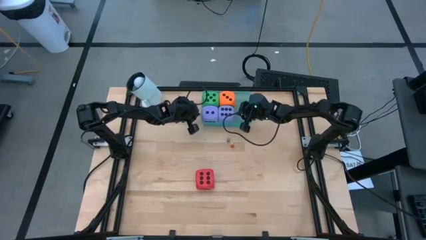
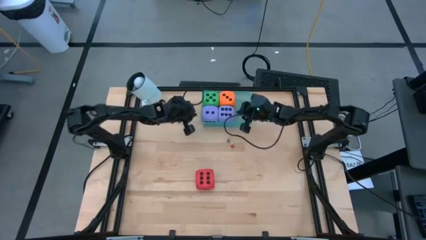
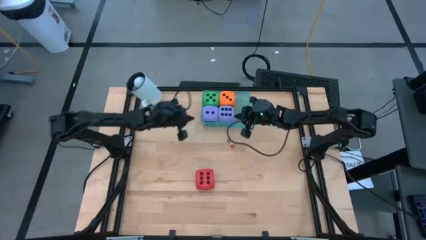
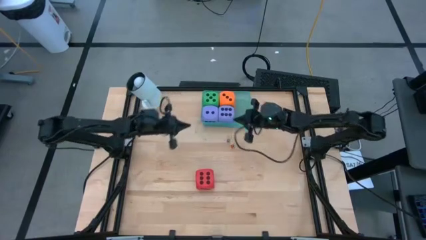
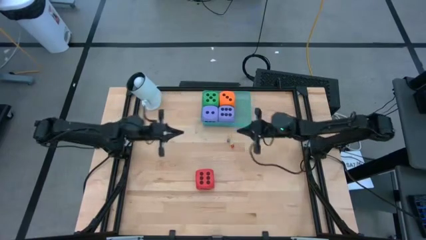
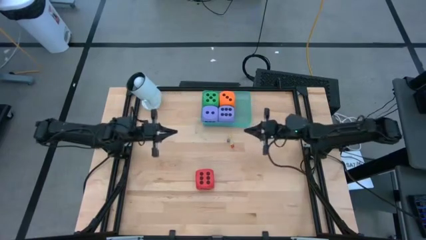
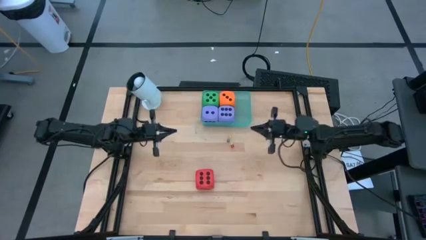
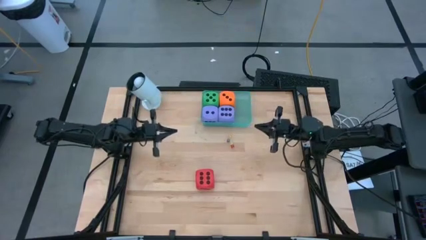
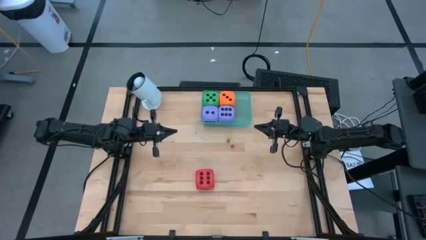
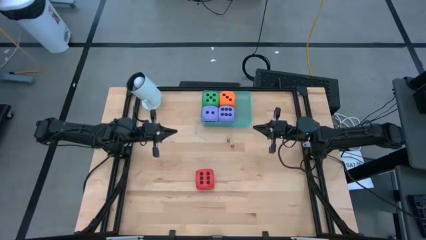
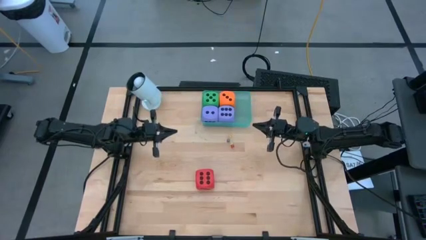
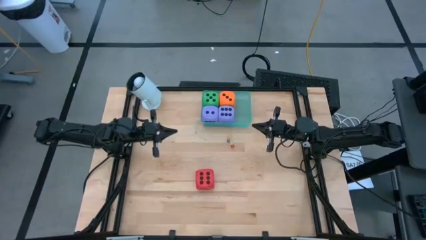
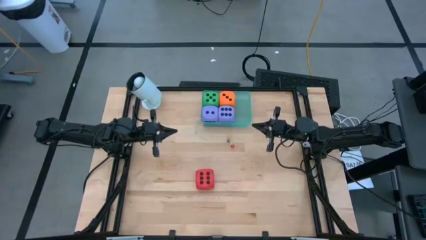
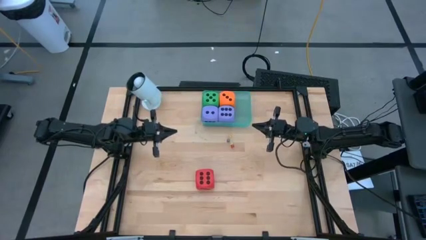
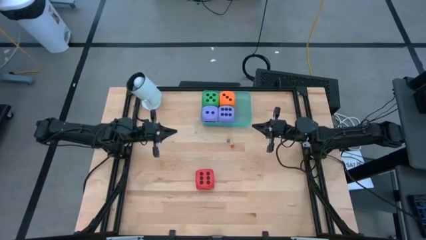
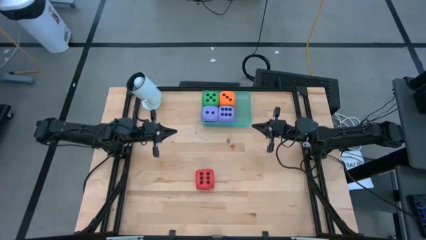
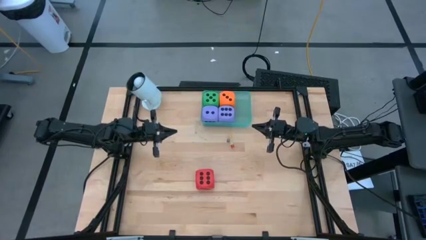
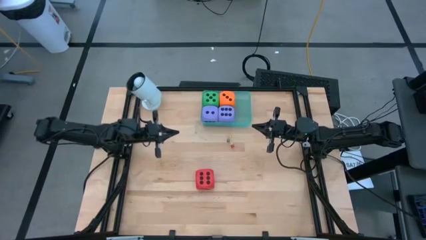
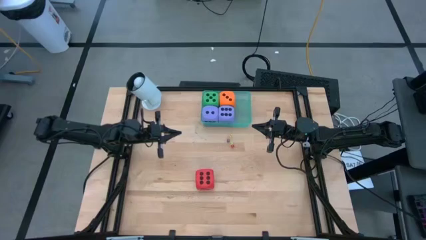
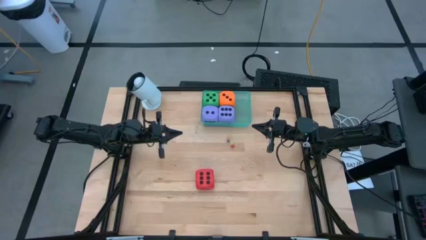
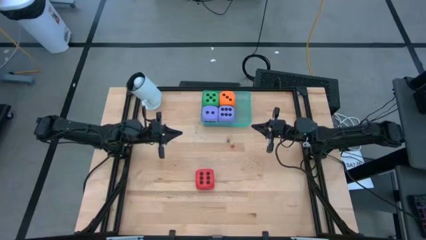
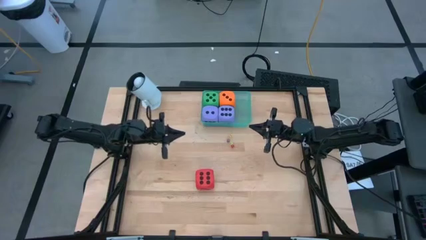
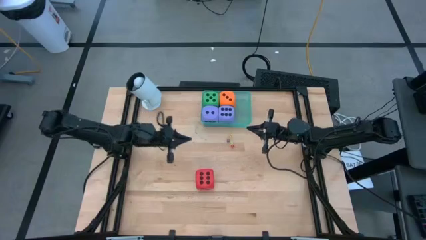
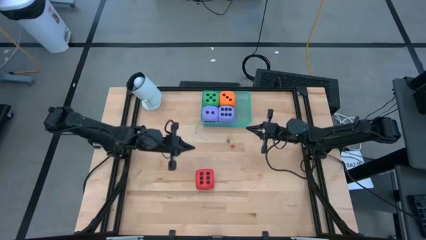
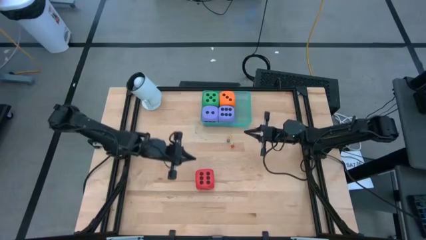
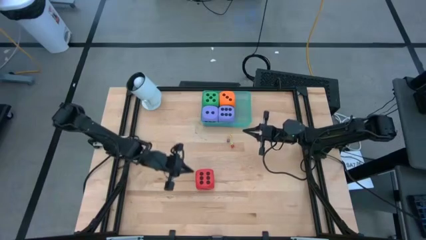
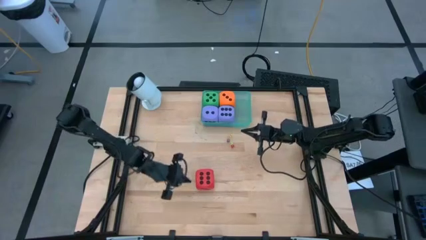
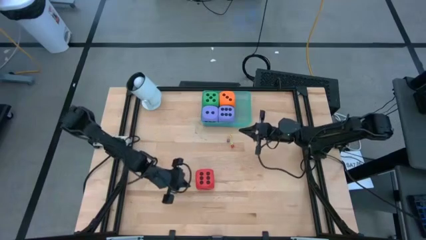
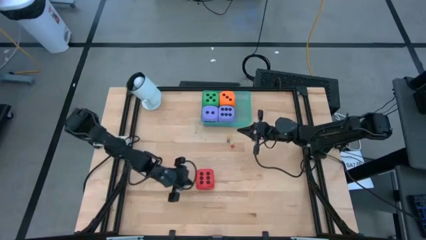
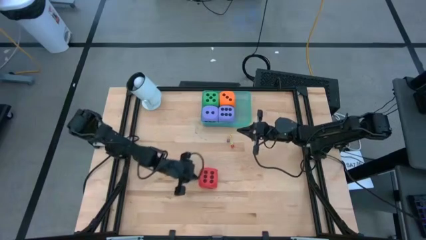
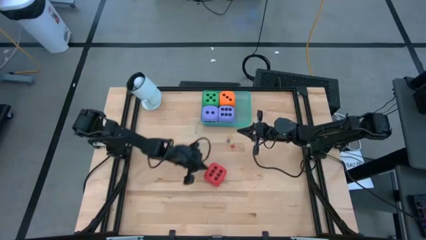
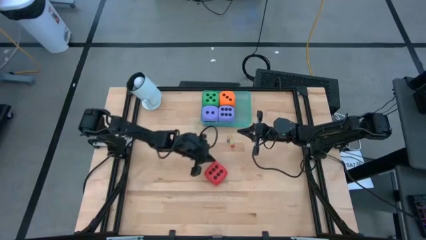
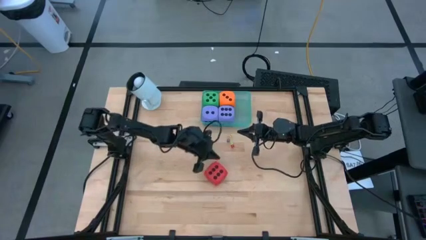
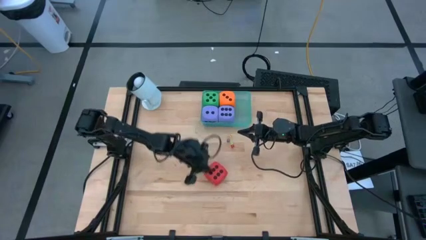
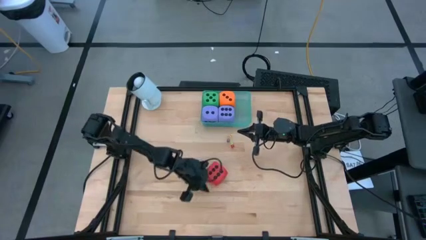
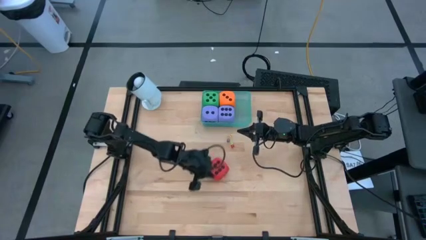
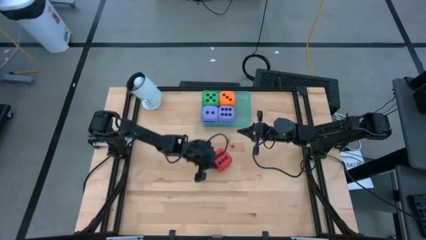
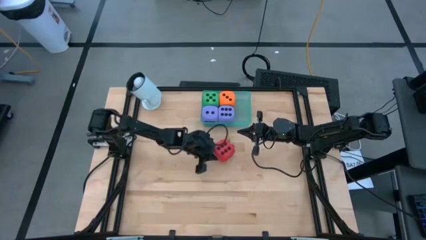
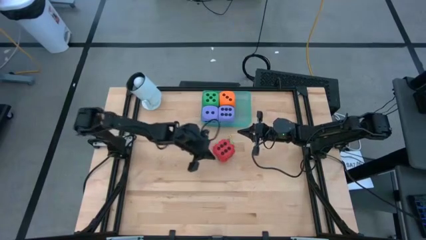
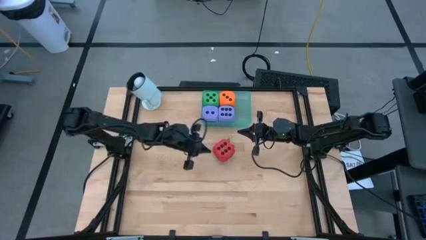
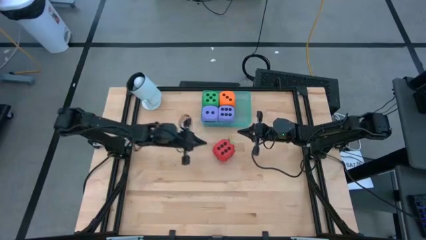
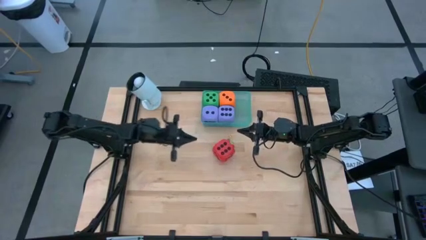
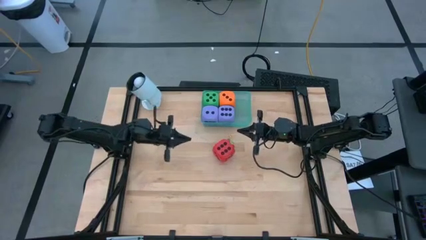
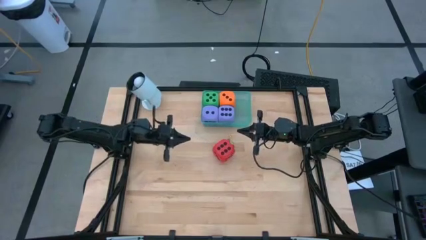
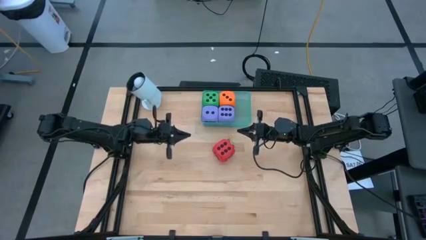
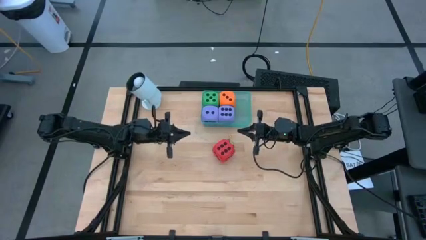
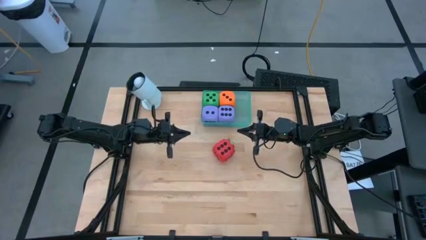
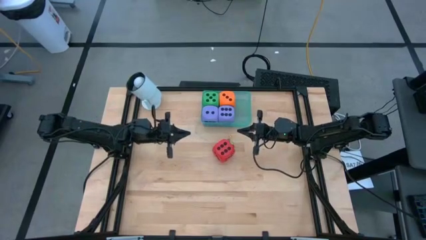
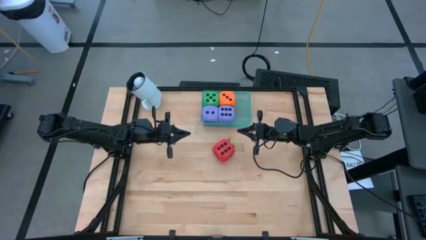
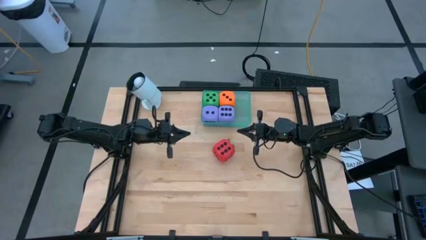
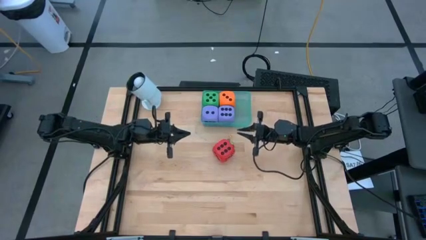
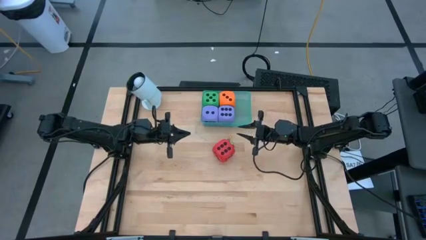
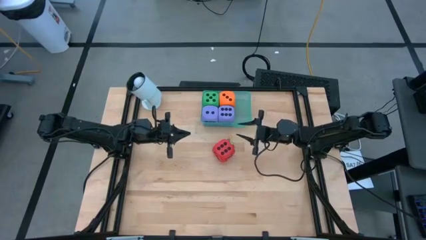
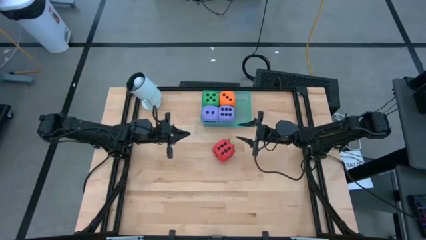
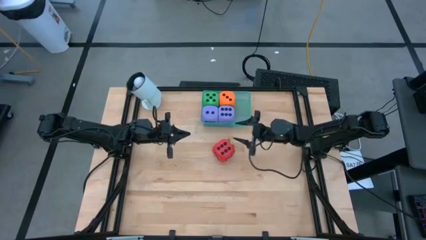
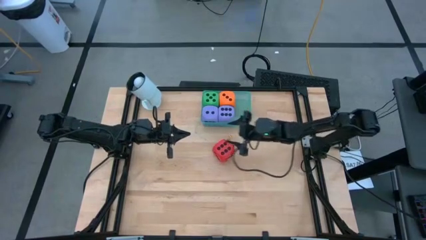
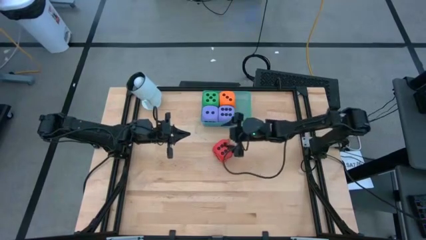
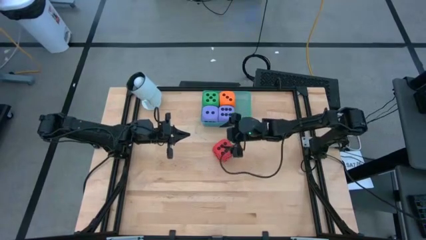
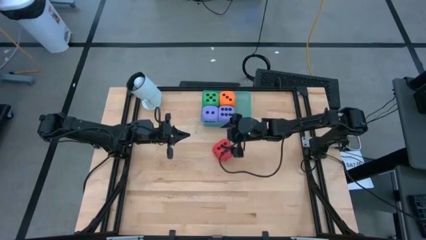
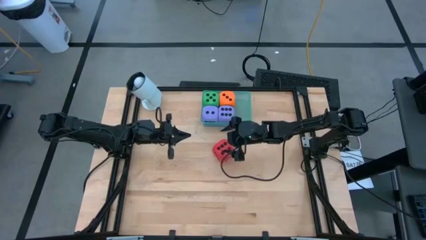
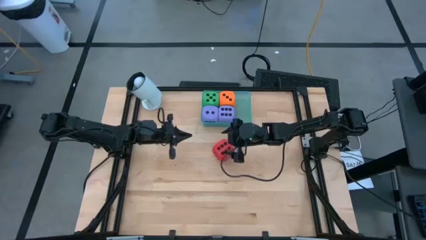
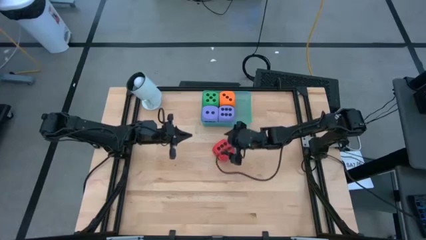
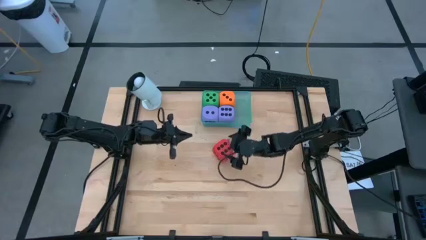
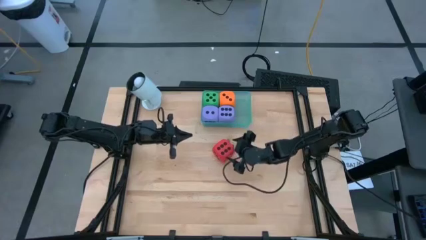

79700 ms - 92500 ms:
Task: Pick & Place Dice
Put the large red dice into the green container
